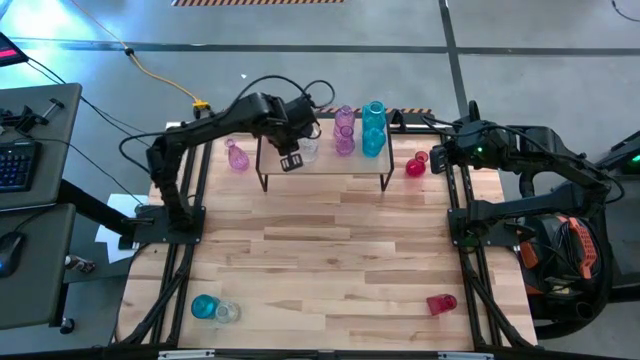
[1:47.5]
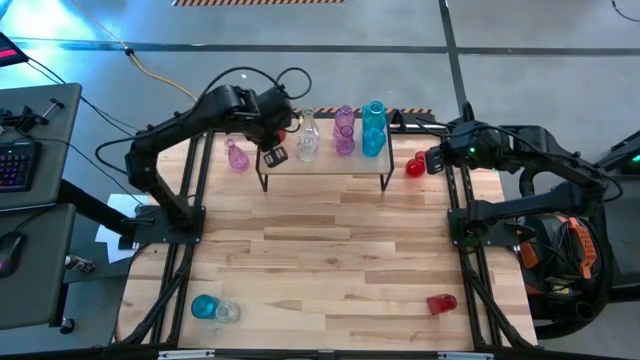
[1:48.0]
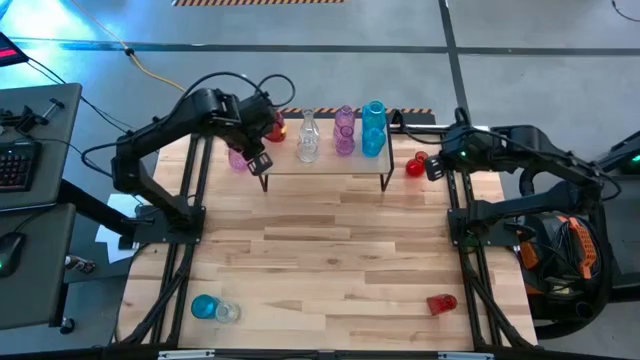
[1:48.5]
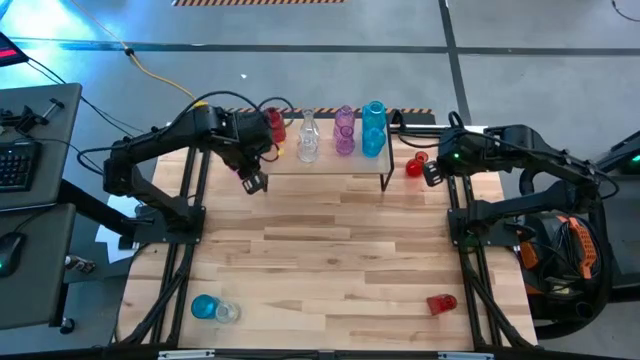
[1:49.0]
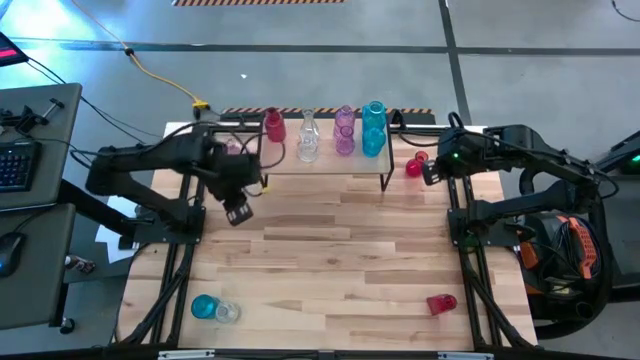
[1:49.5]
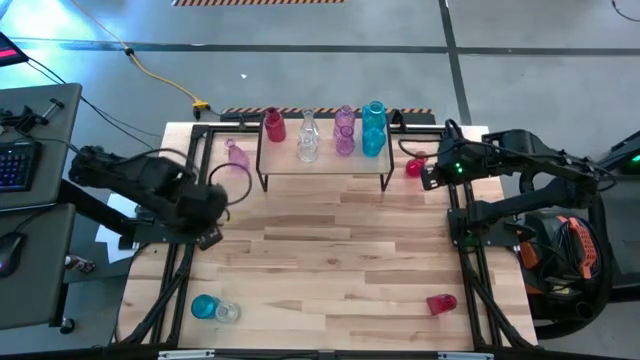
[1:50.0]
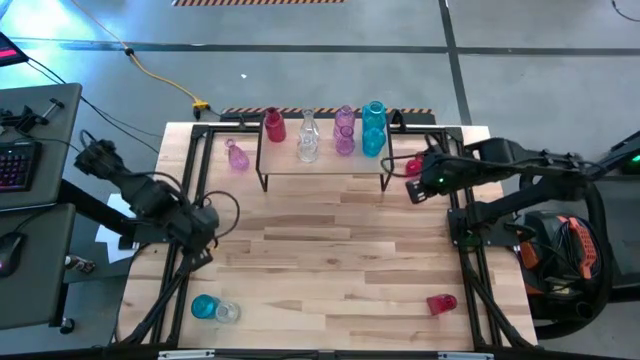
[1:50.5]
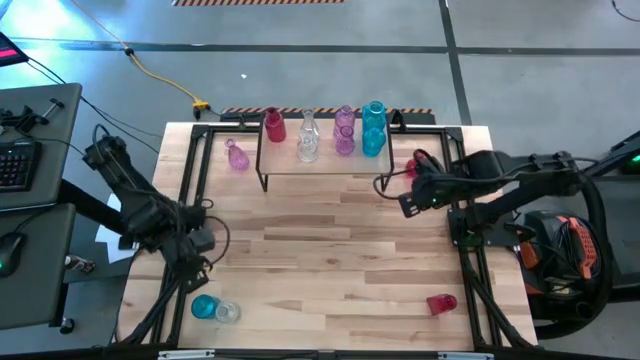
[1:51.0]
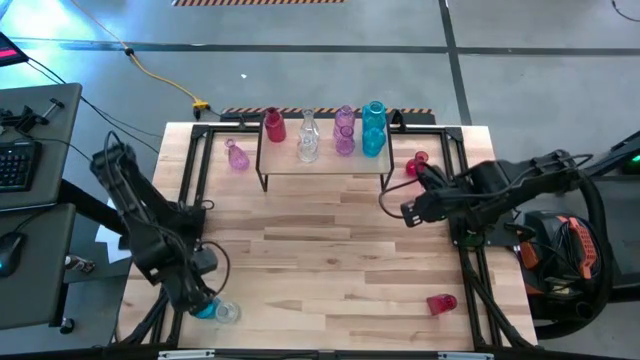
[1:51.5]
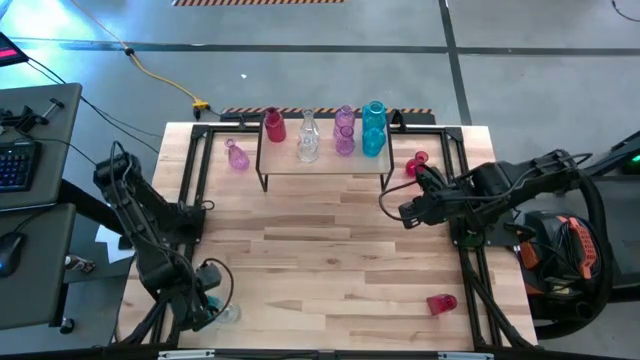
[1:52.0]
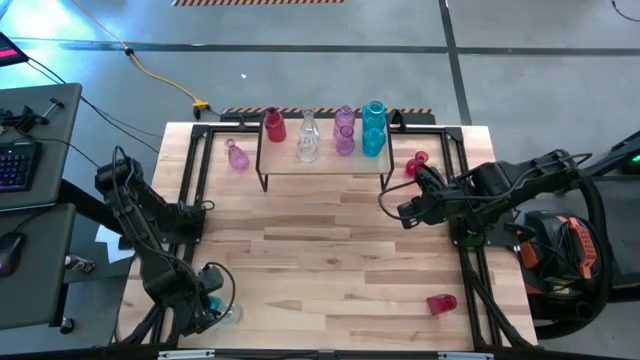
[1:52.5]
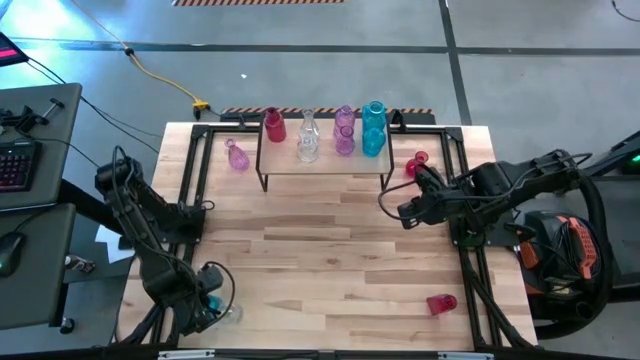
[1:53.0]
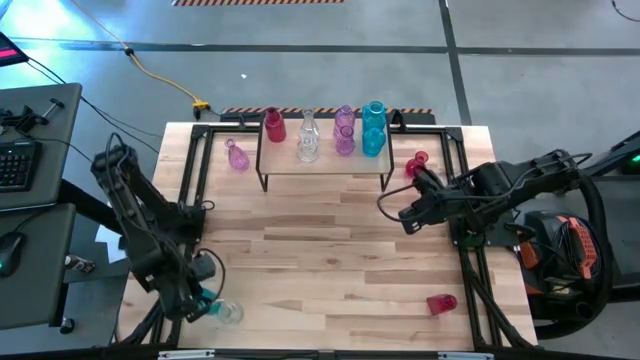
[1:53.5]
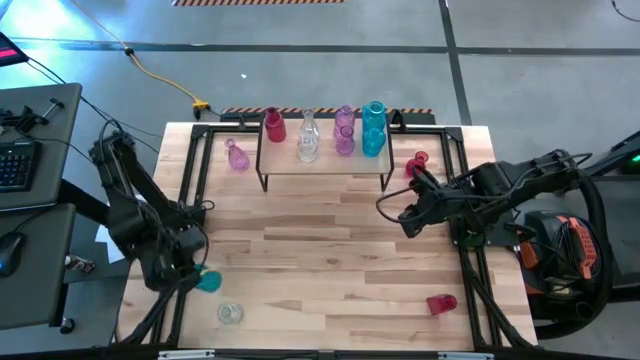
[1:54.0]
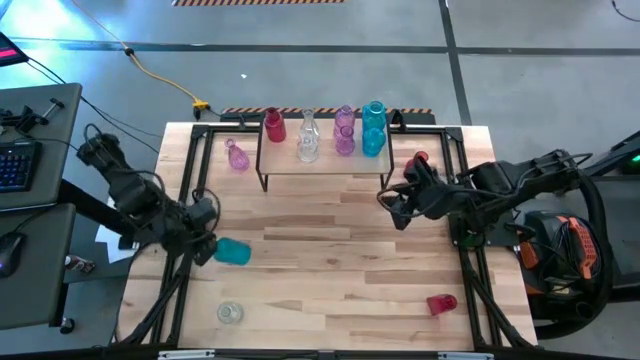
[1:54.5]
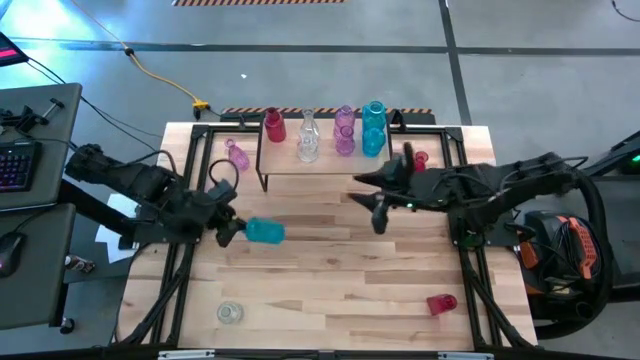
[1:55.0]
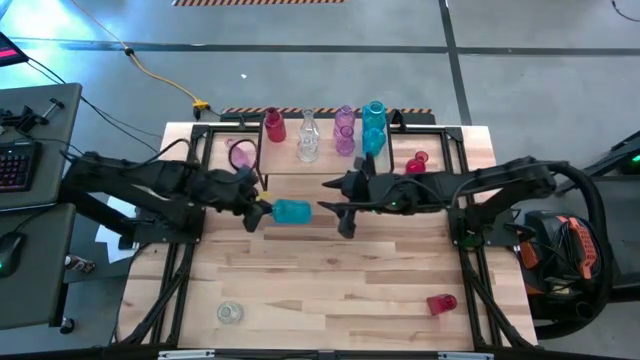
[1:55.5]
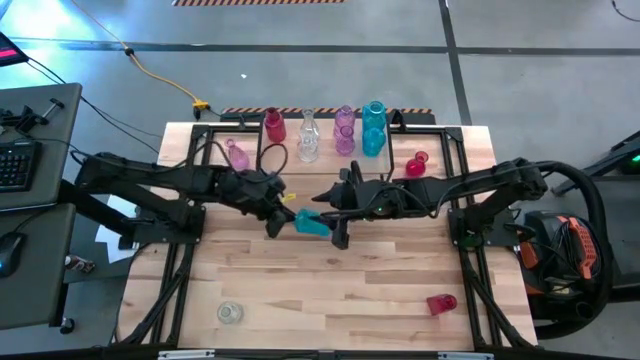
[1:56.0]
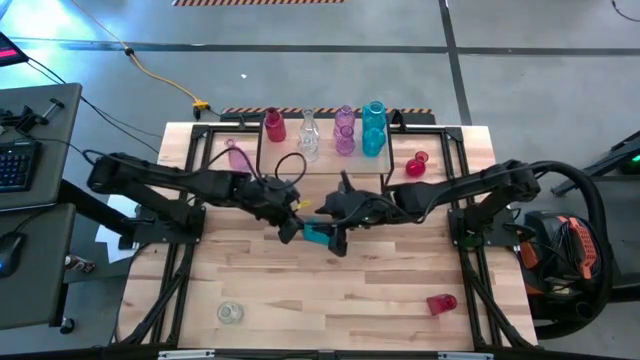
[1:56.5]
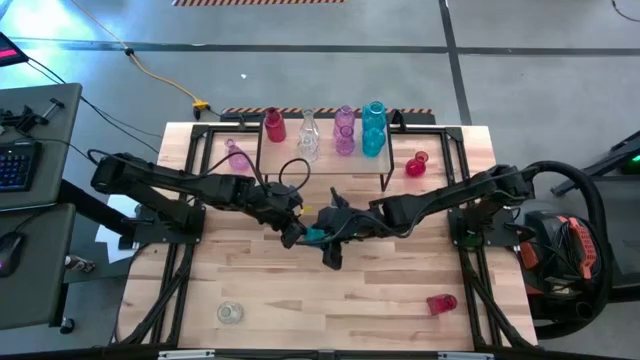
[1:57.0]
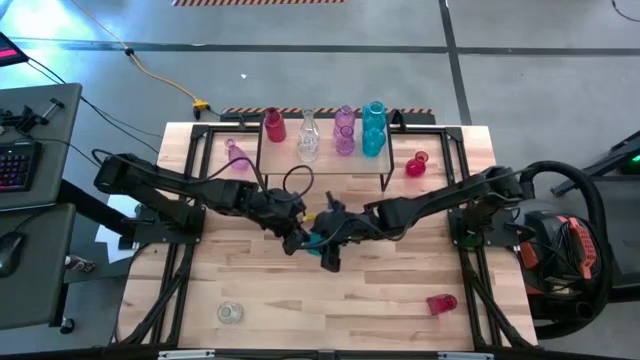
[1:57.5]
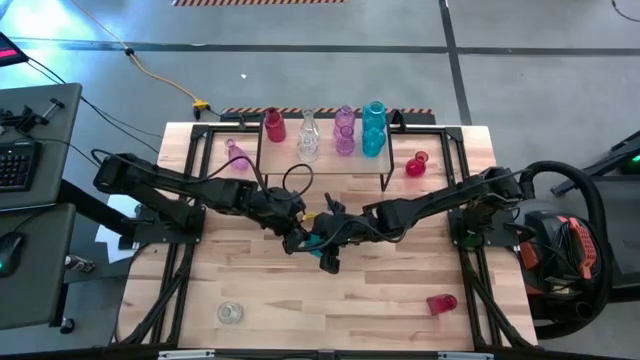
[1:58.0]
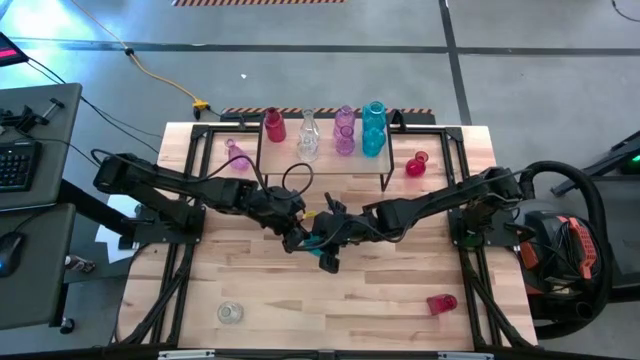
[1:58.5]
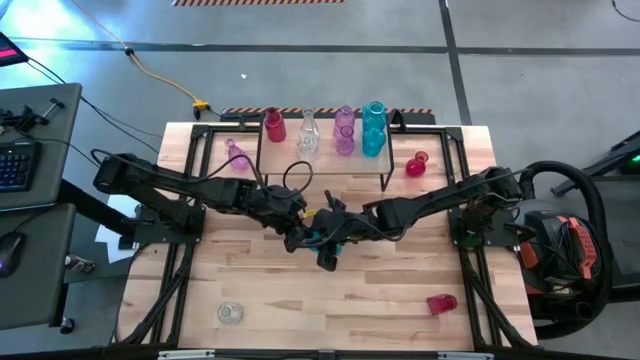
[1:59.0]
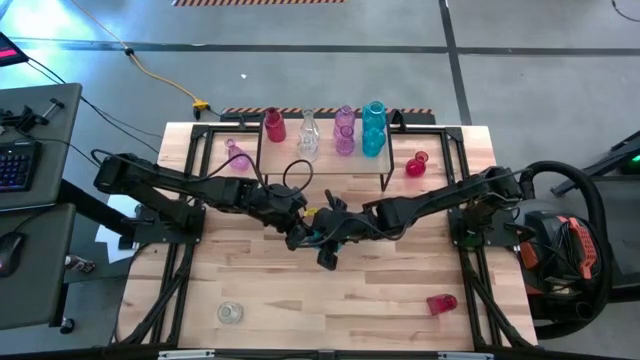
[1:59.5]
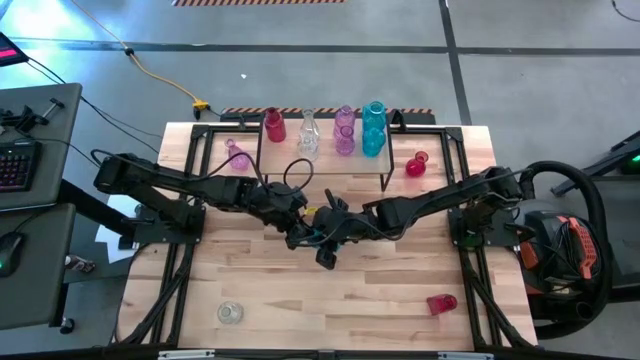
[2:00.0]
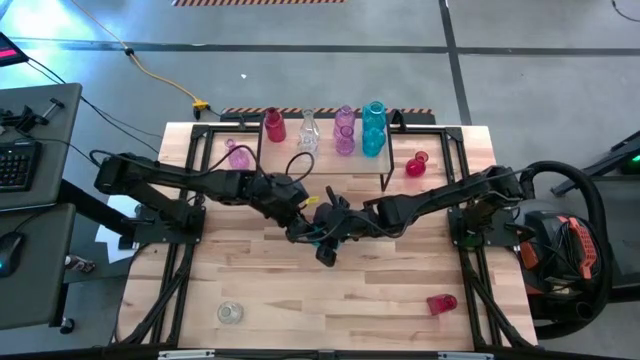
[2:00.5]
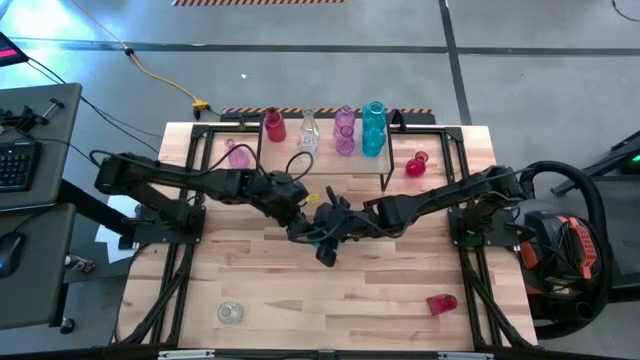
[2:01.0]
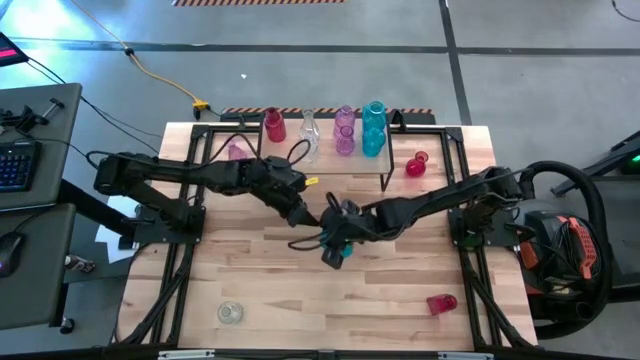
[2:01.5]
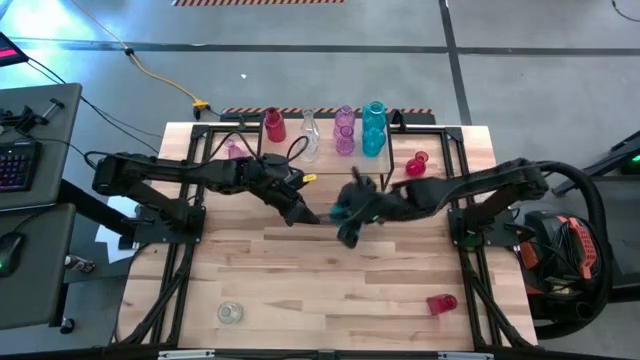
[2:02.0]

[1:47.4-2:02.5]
Task: sort vases onto shelf
Put the blue vase on the shelf aligned with the other blue vases

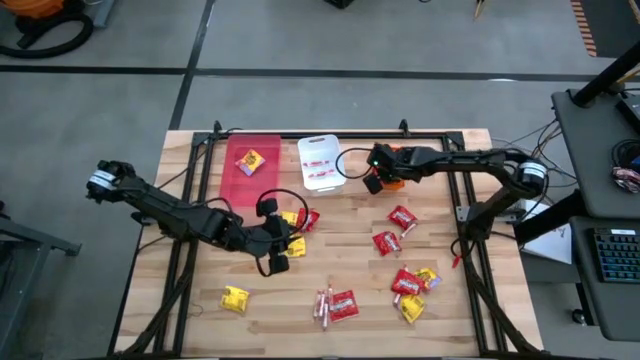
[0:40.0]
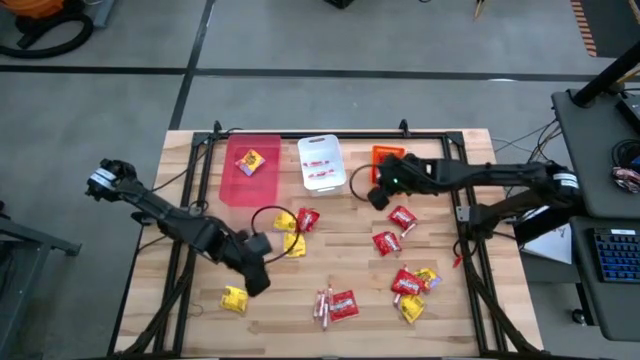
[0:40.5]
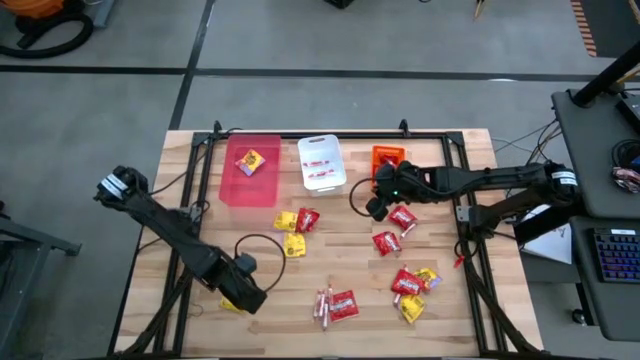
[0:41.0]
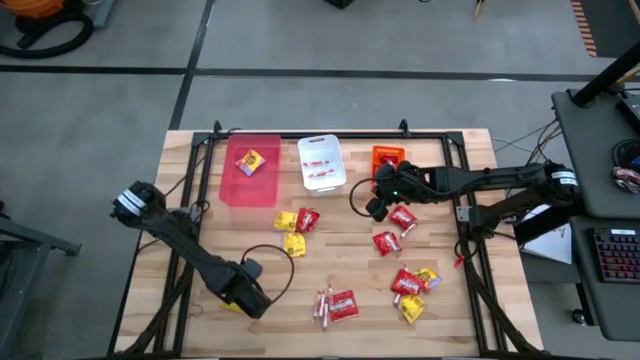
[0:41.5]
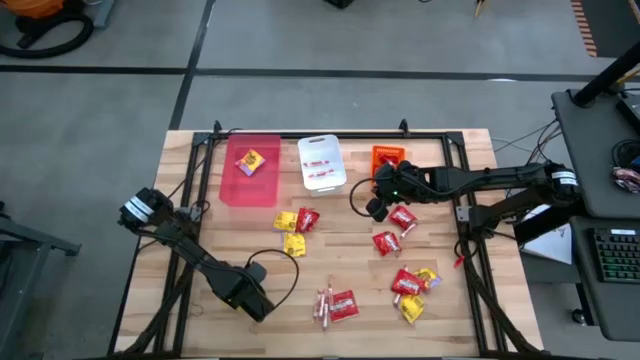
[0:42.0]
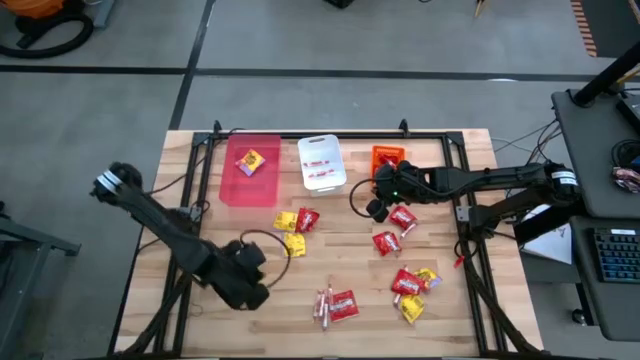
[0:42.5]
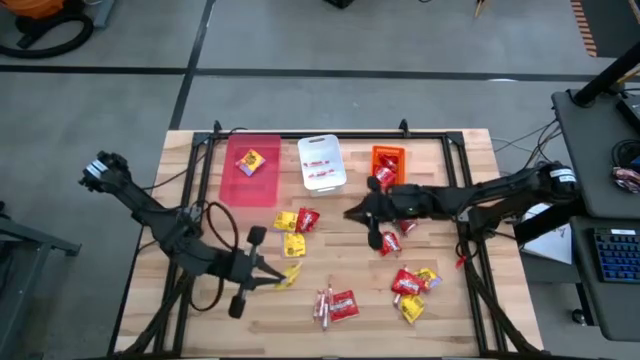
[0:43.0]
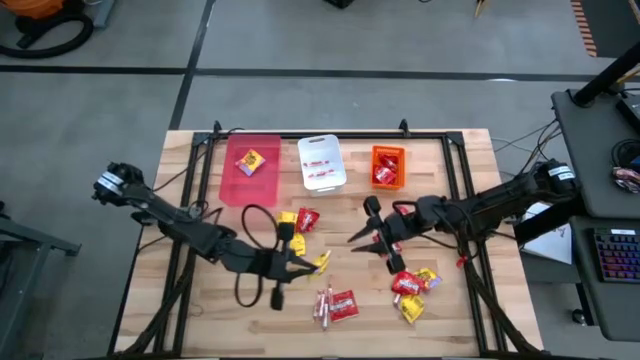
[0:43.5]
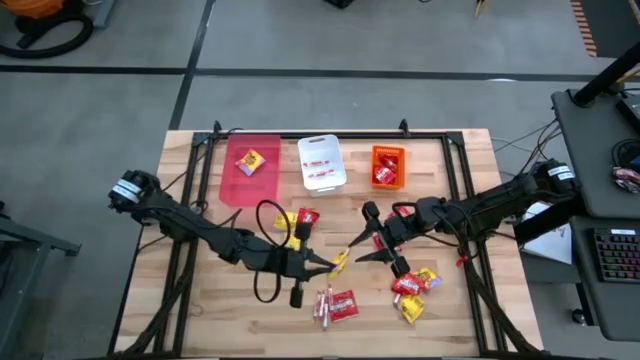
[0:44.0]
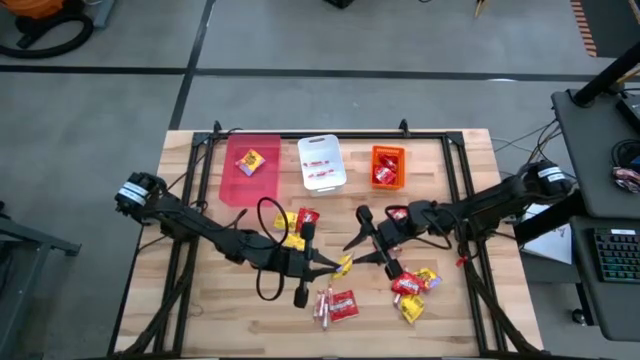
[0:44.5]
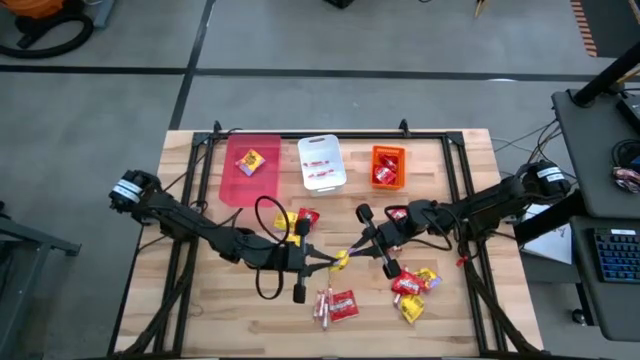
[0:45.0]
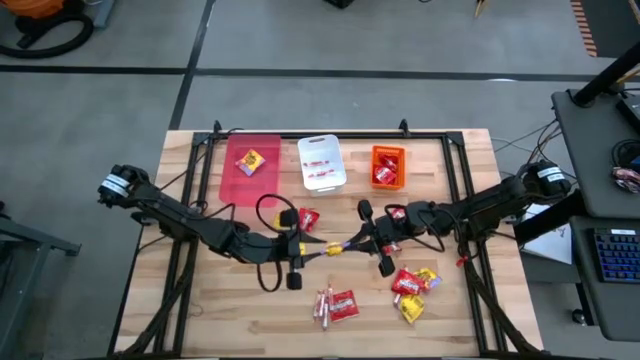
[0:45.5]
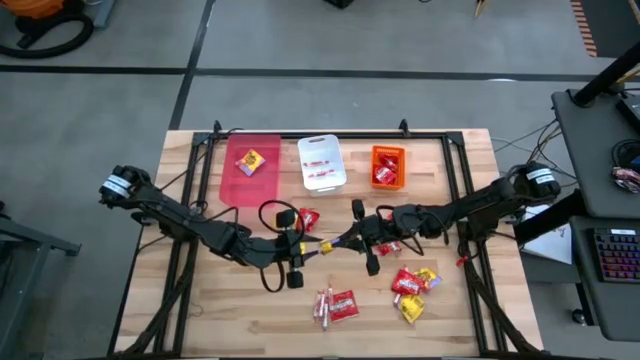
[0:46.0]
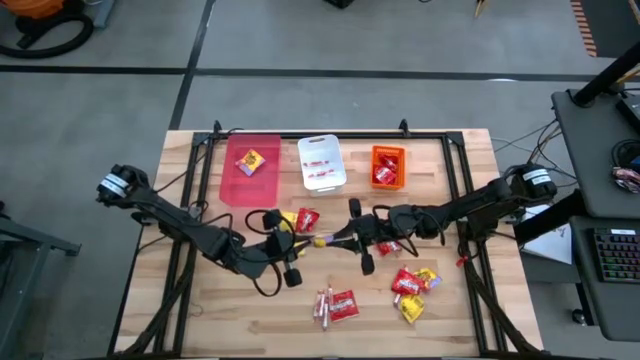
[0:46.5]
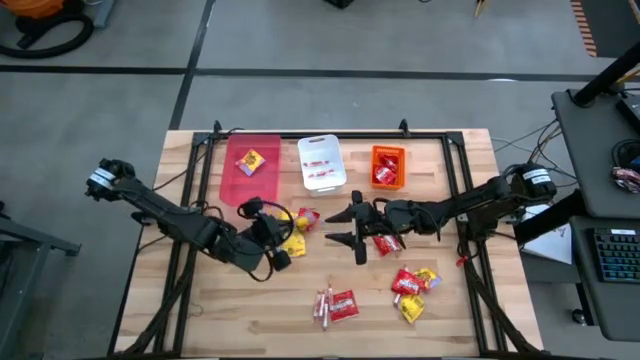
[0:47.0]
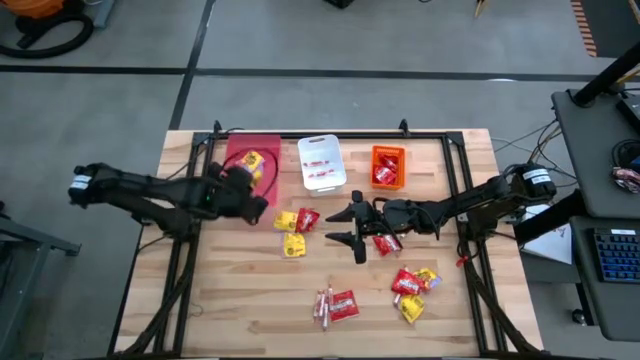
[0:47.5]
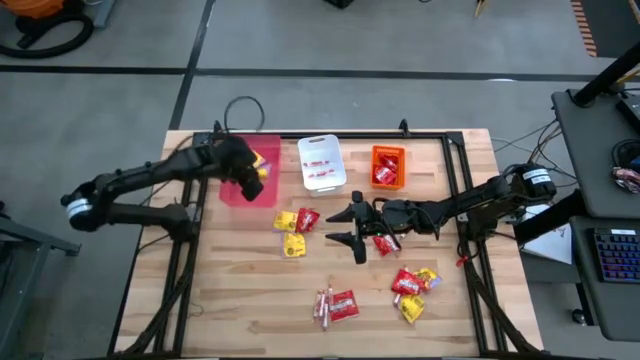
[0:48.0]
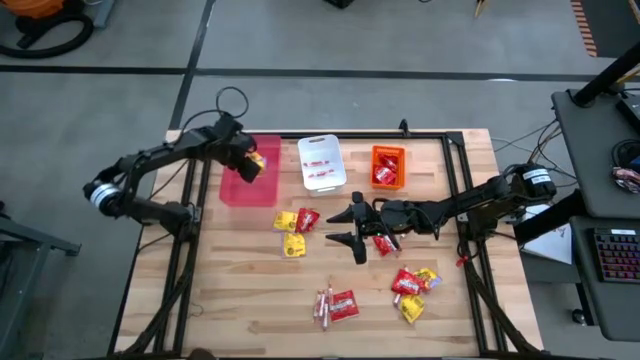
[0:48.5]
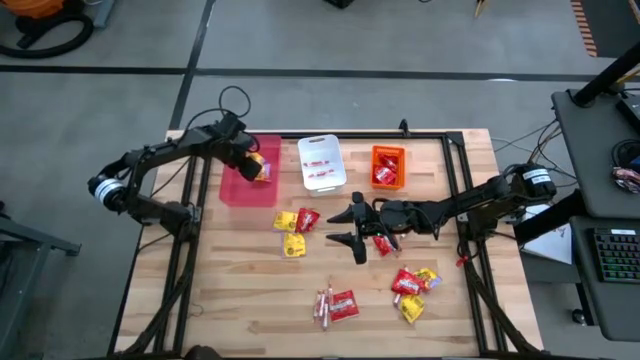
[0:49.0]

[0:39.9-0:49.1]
Task: Sort candy
Put the yellow candy into the pink bin
